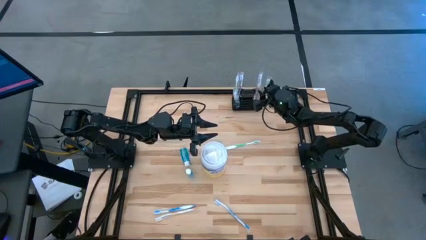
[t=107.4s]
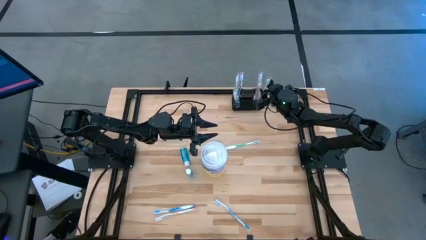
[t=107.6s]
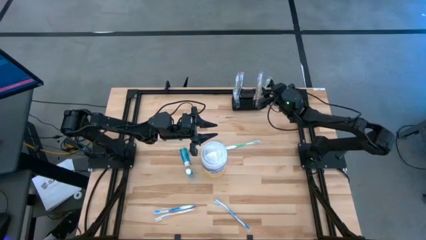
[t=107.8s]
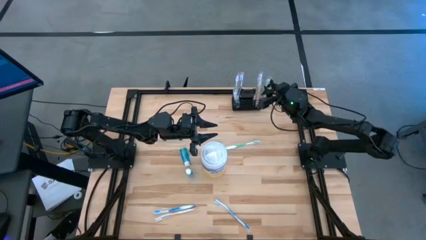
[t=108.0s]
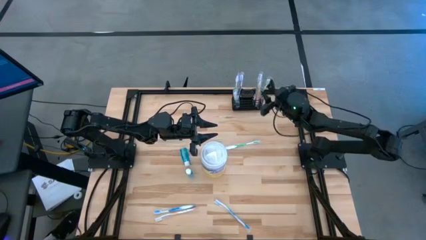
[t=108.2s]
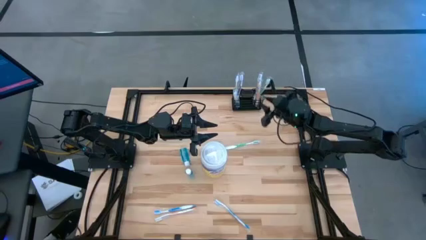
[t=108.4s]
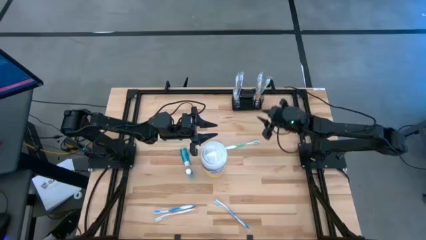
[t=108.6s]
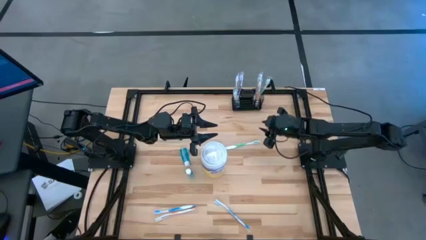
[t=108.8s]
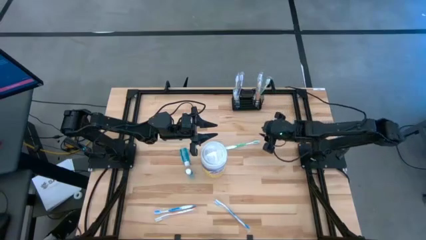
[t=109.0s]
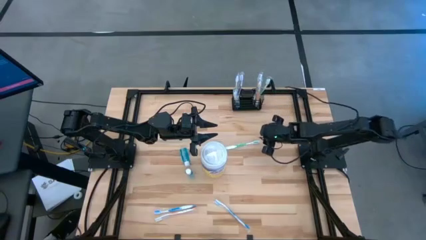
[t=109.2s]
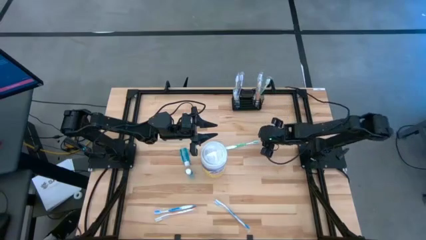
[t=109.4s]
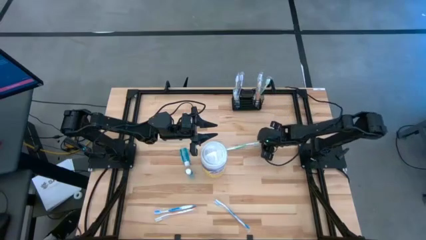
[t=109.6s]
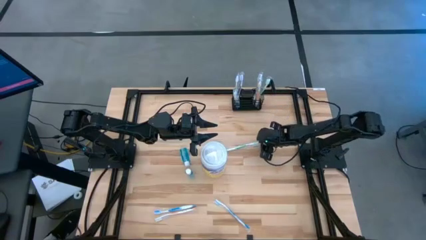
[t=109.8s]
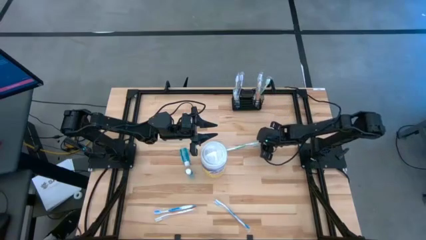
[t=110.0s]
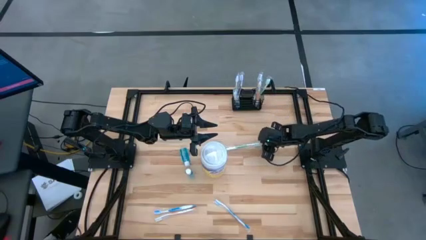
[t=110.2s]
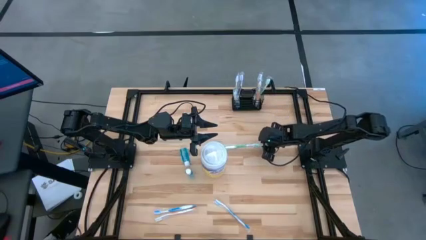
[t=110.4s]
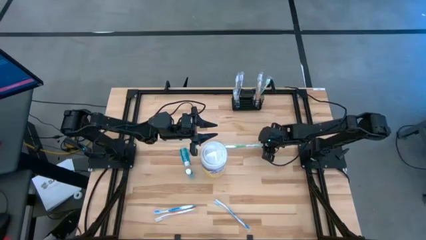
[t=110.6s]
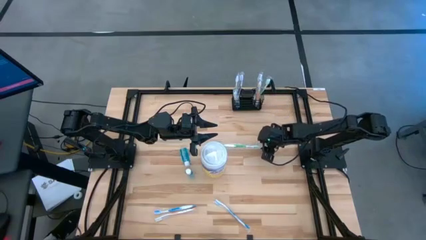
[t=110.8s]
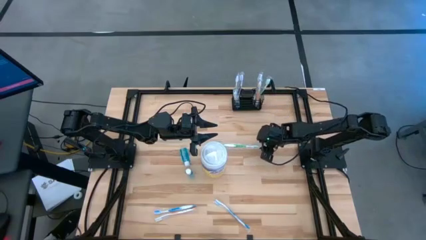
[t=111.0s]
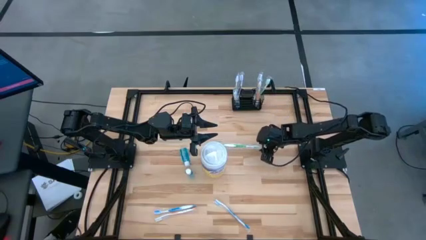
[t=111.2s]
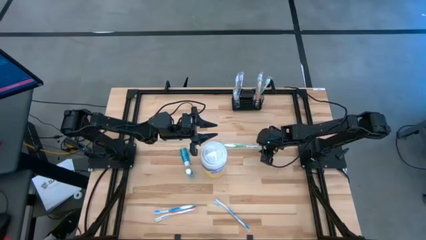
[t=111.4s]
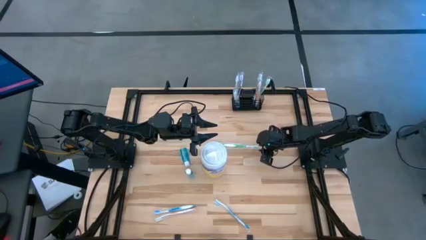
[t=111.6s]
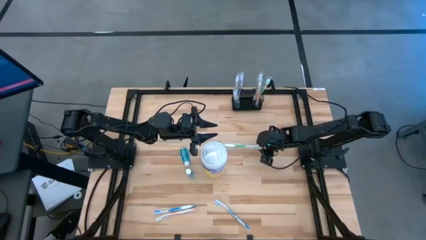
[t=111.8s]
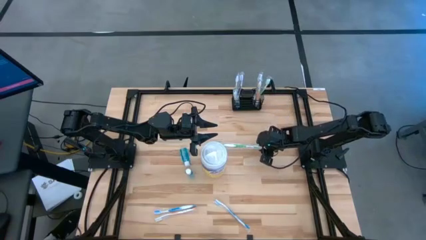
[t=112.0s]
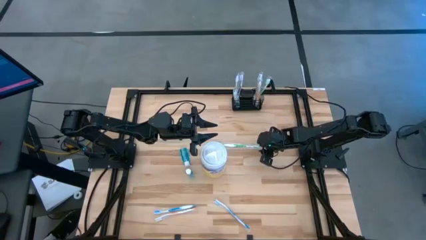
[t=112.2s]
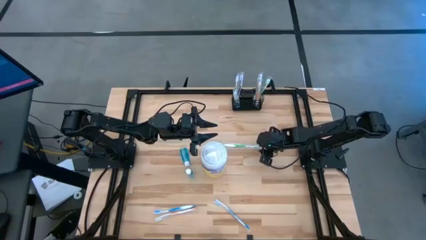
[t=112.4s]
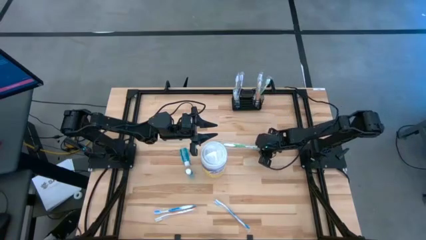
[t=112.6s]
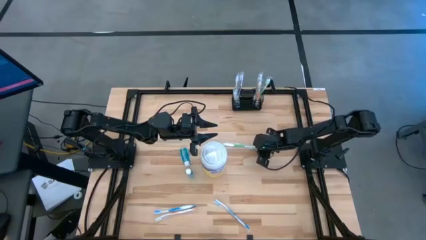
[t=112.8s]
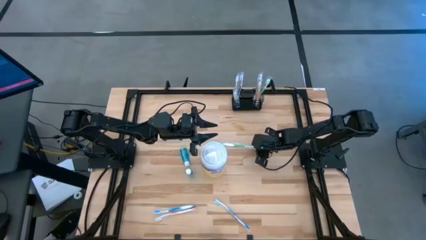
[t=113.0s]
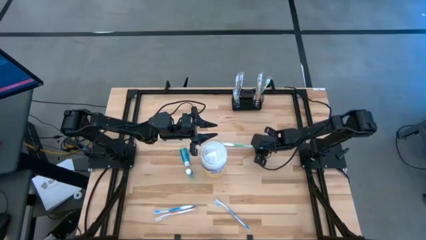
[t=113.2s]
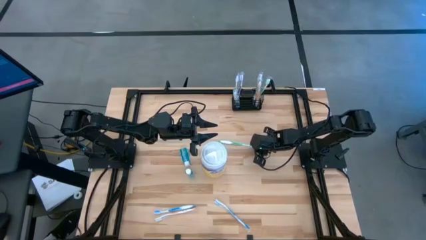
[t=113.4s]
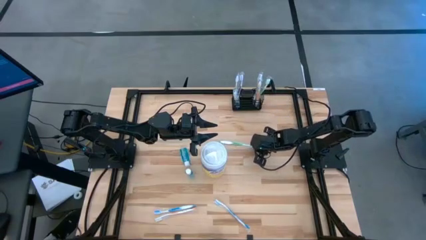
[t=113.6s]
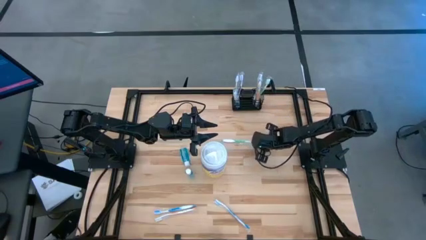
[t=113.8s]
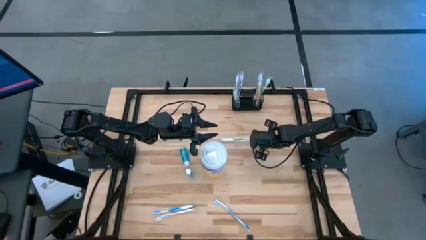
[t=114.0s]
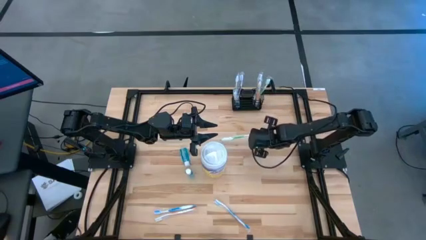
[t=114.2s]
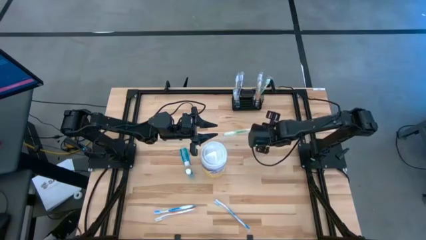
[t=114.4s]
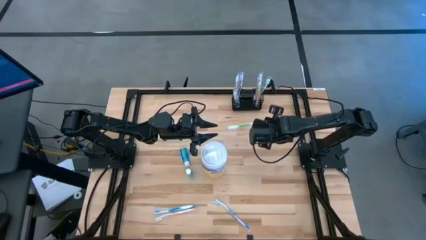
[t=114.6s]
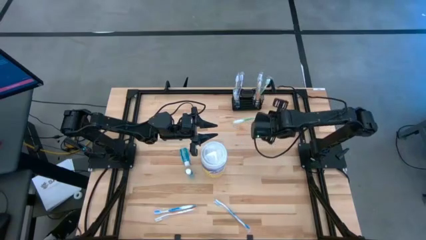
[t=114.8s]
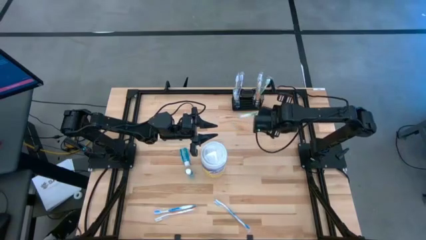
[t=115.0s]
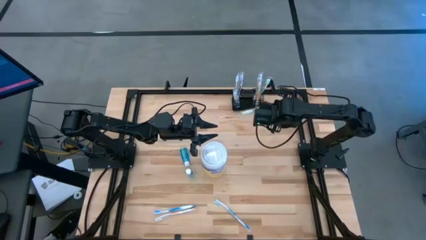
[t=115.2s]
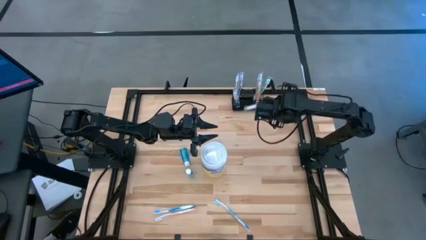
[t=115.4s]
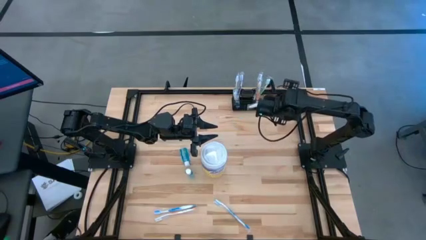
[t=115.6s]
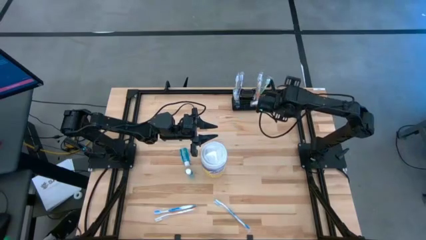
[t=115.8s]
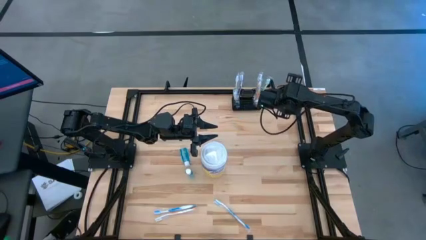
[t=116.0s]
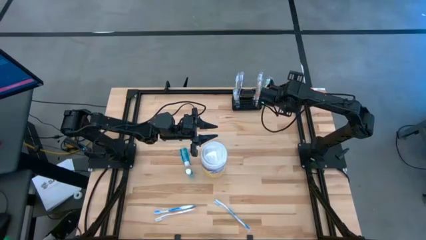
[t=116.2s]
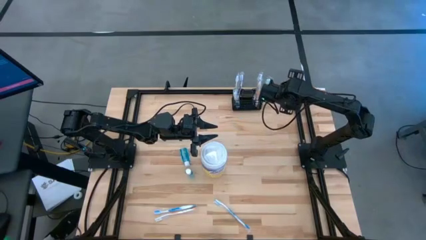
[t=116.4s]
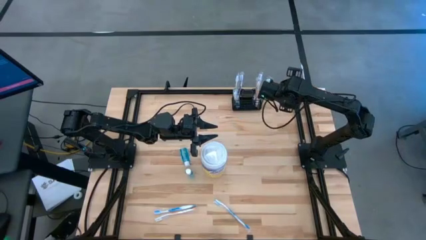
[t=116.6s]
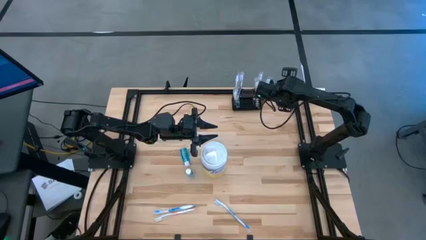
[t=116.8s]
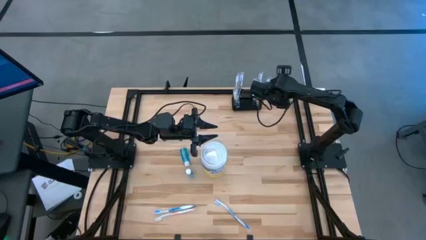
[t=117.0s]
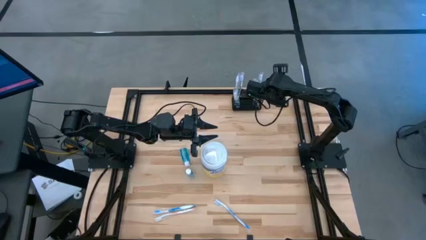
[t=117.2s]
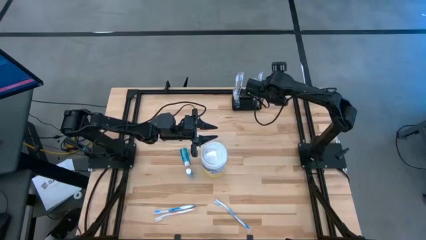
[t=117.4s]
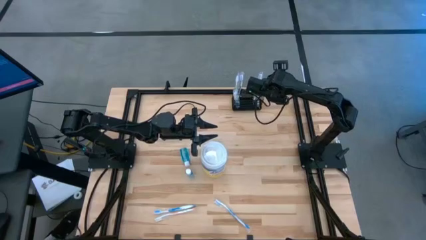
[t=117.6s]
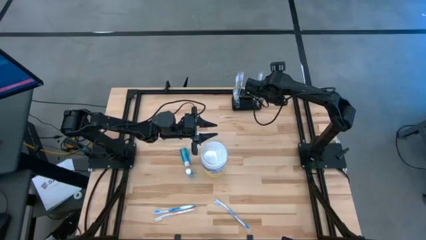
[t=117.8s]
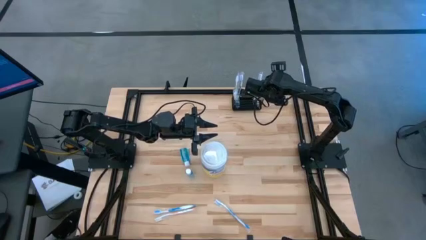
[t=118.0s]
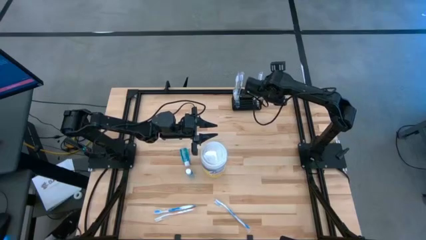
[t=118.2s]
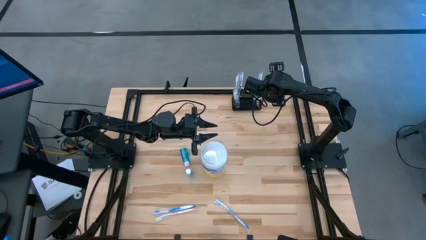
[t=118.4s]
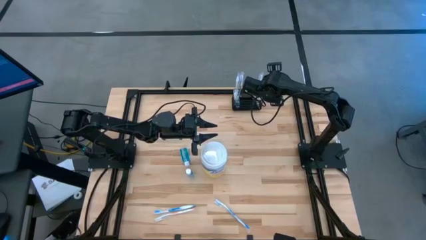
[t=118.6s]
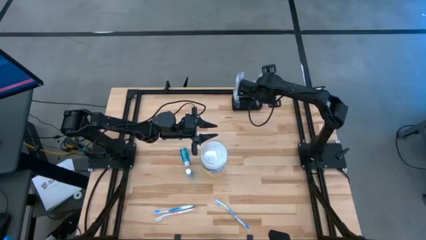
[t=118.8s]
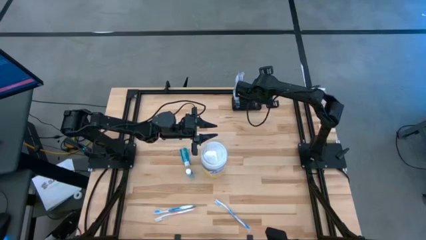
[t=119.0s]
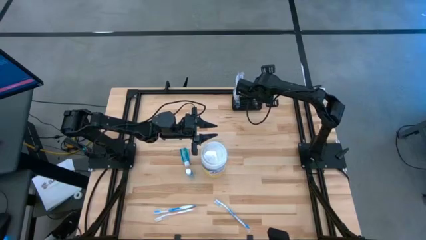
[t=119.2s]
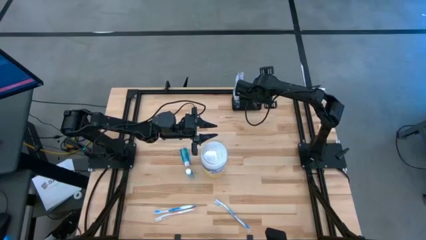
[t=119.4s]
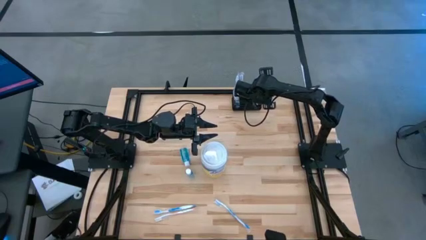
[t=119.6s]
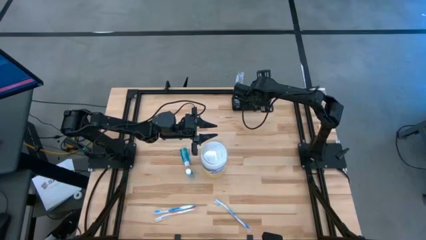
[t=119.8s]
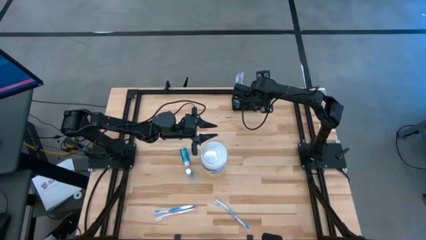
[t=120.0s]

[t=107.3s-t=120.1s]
Task: Pick & Place toothbrushing station
Put the green toothbrush into the black mesh organizer
